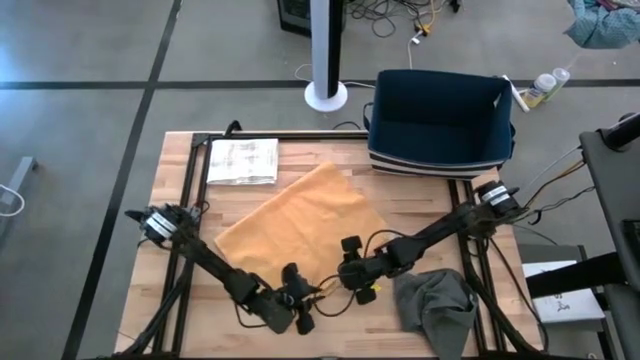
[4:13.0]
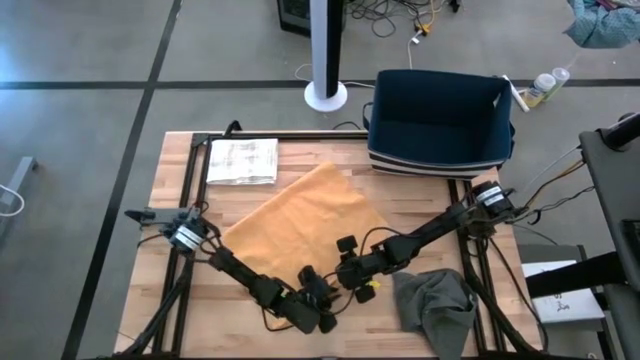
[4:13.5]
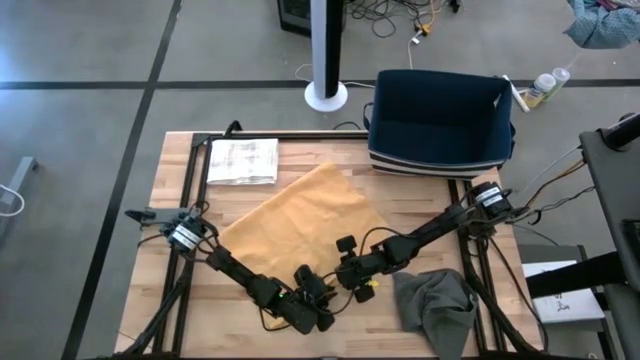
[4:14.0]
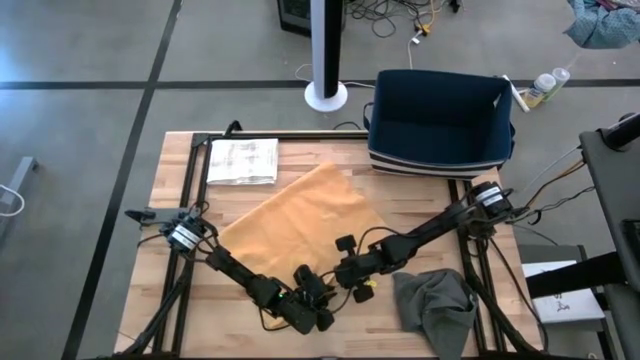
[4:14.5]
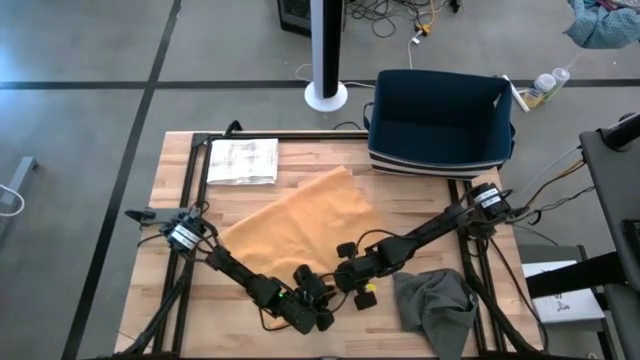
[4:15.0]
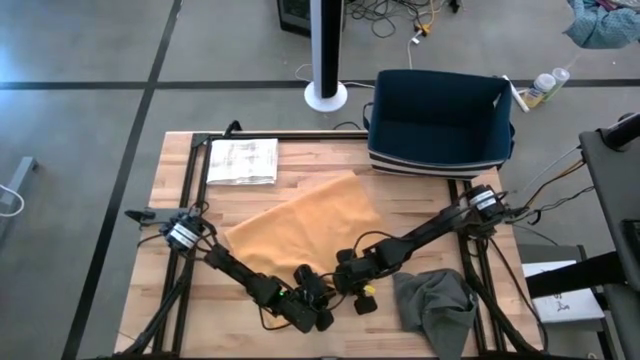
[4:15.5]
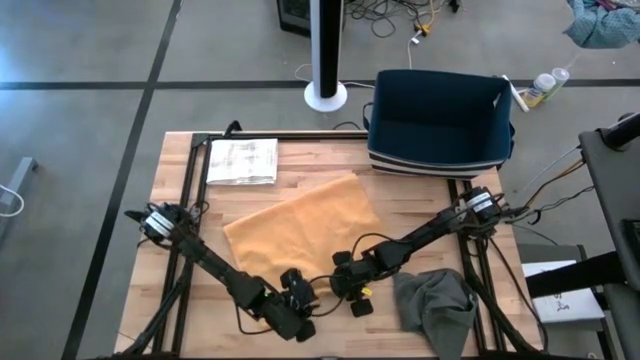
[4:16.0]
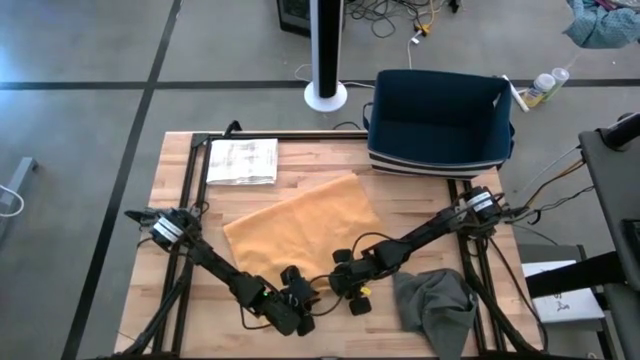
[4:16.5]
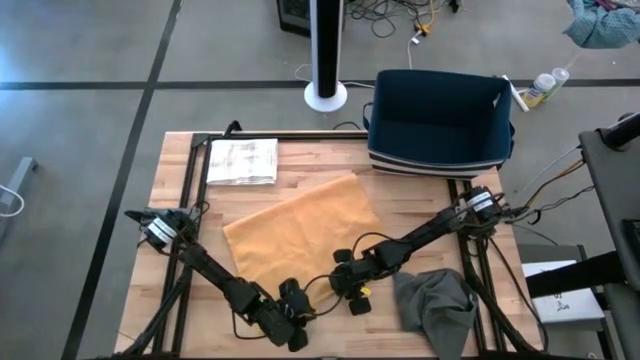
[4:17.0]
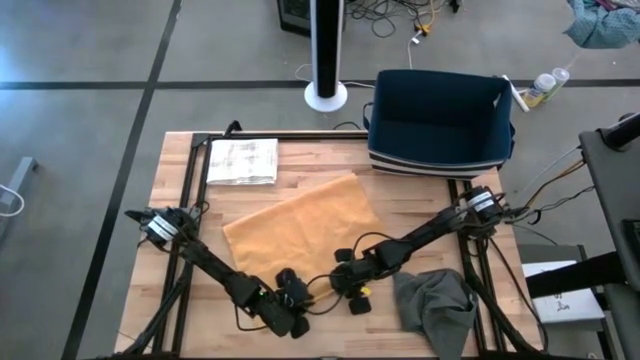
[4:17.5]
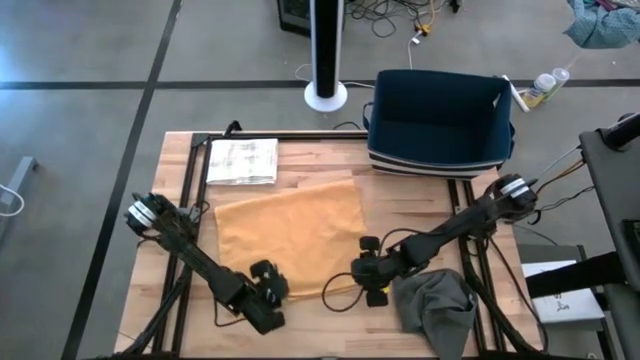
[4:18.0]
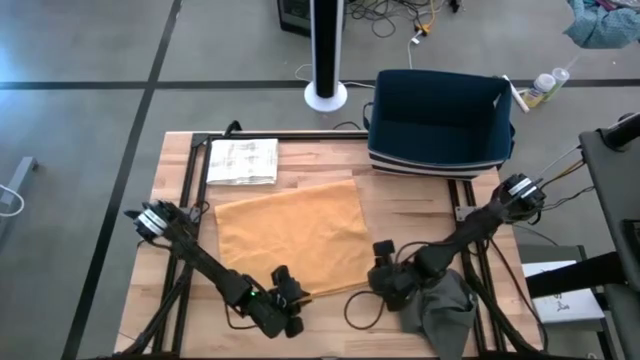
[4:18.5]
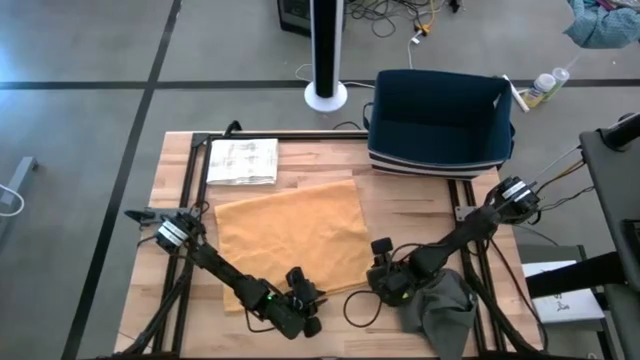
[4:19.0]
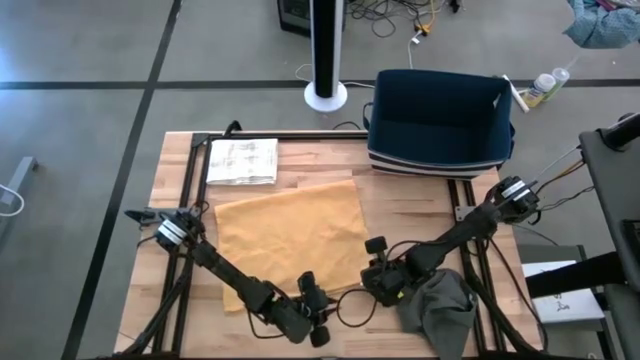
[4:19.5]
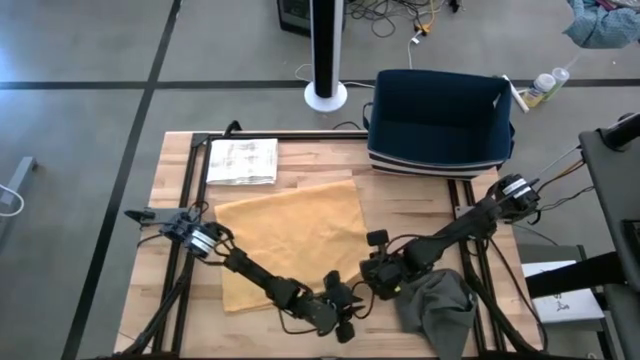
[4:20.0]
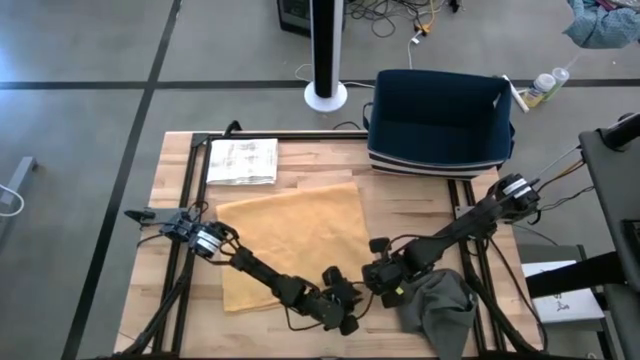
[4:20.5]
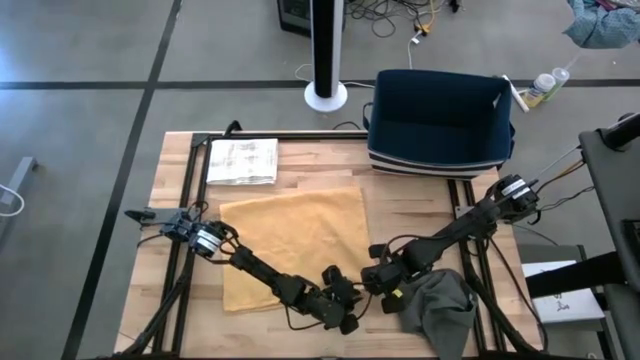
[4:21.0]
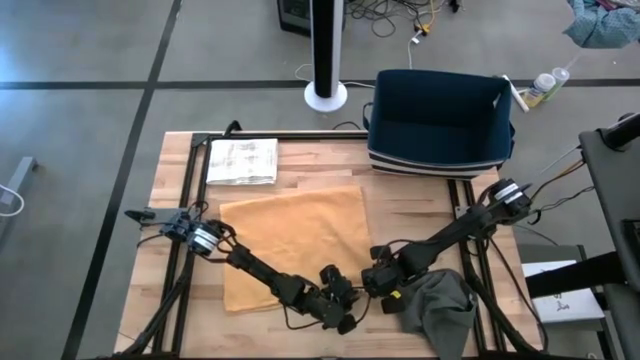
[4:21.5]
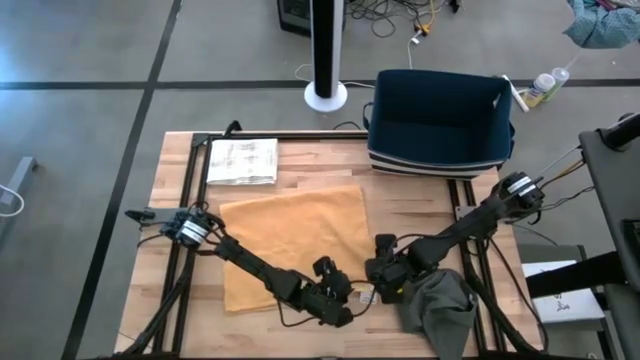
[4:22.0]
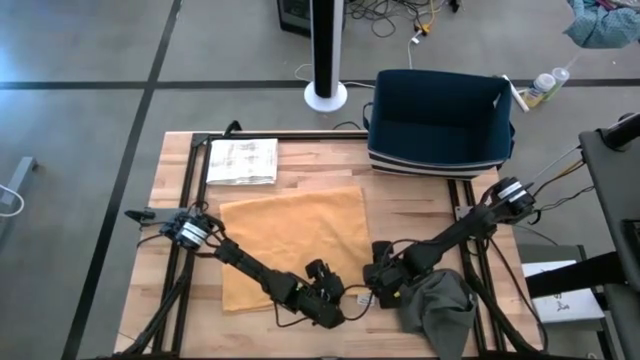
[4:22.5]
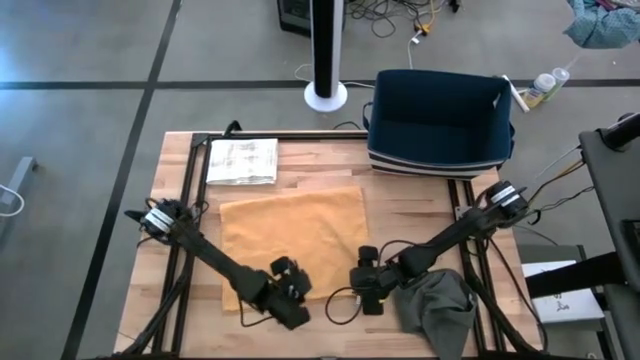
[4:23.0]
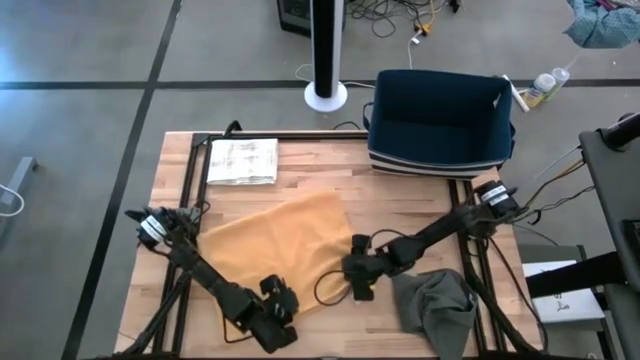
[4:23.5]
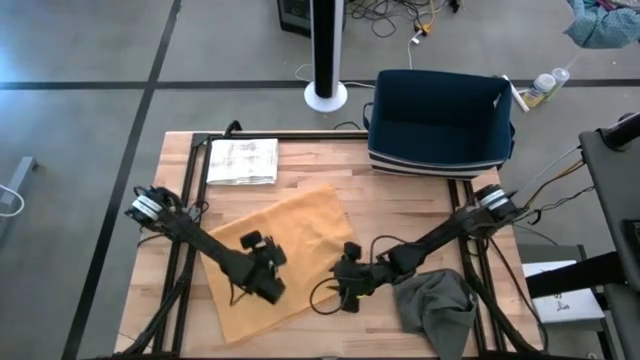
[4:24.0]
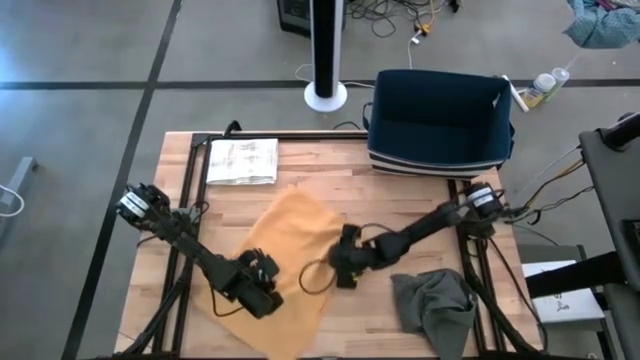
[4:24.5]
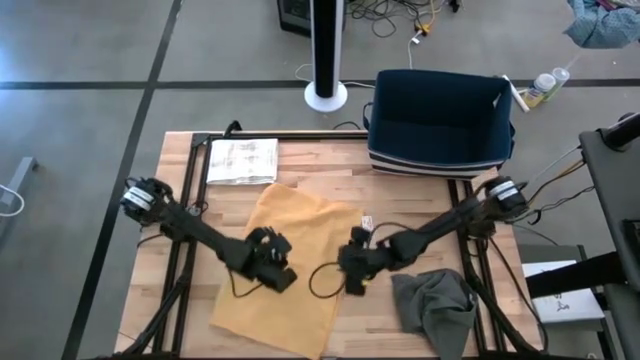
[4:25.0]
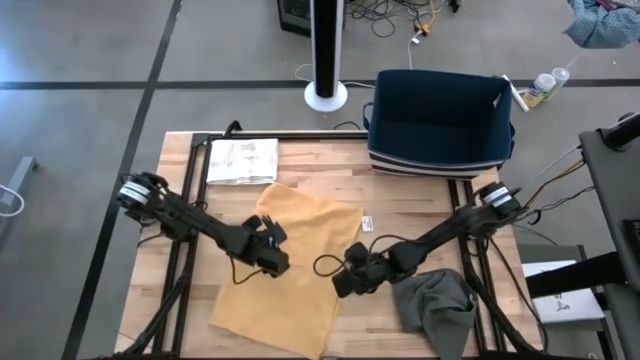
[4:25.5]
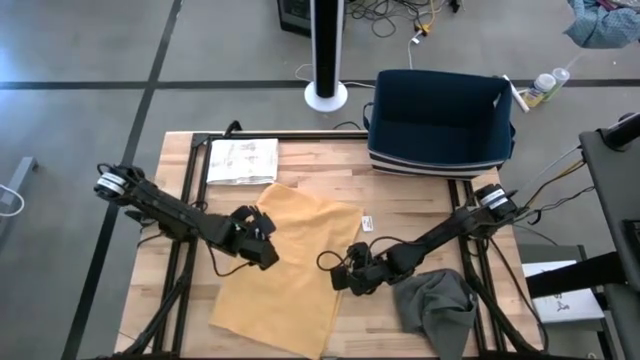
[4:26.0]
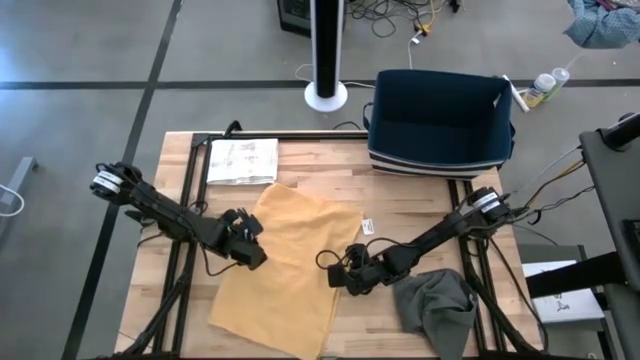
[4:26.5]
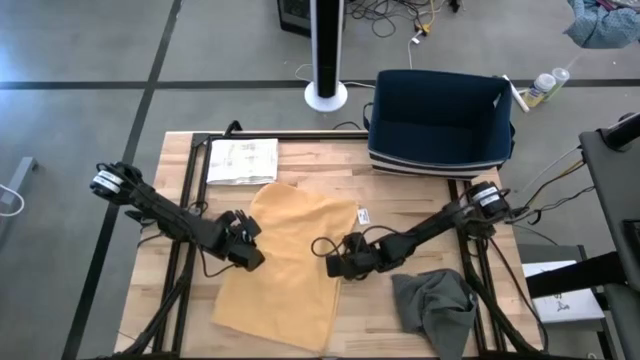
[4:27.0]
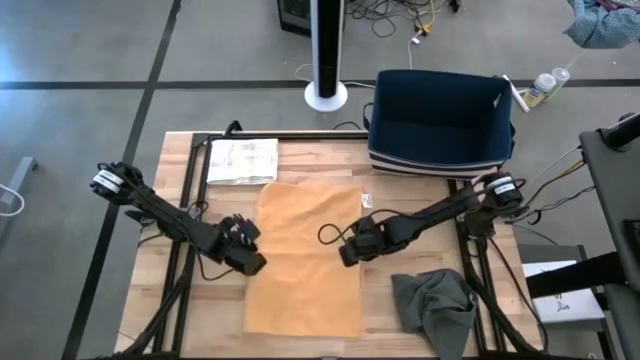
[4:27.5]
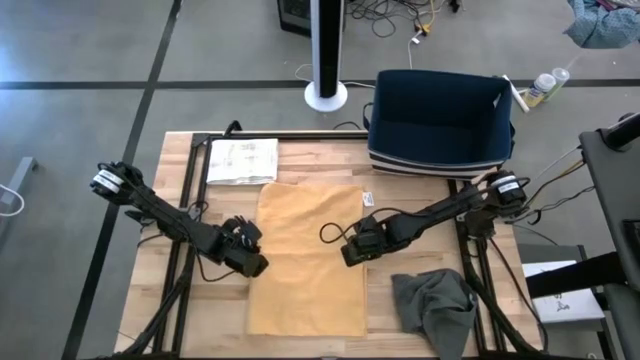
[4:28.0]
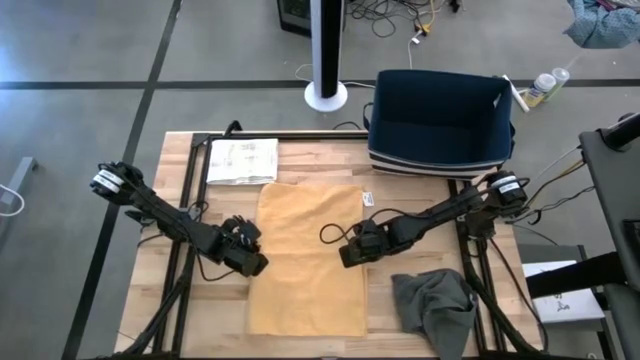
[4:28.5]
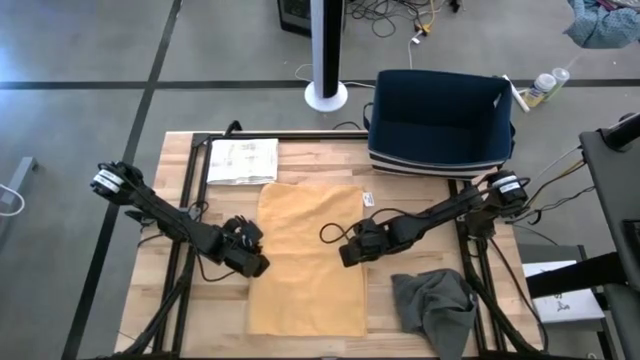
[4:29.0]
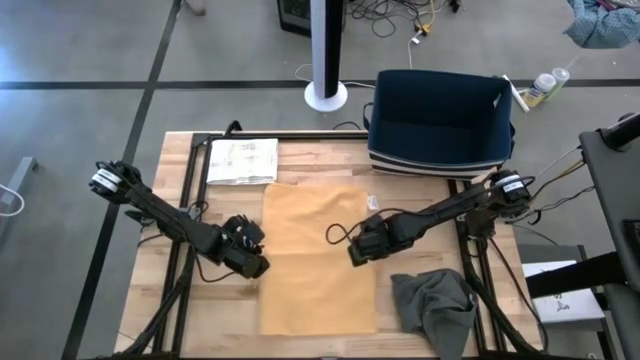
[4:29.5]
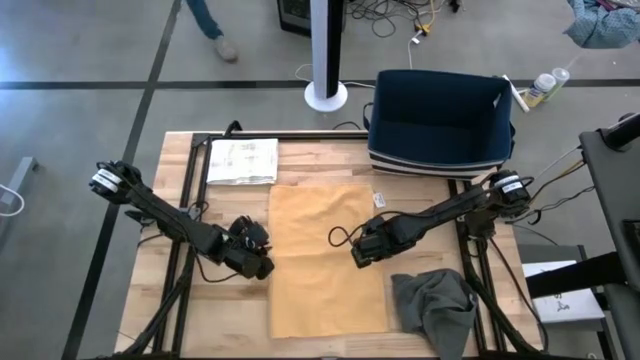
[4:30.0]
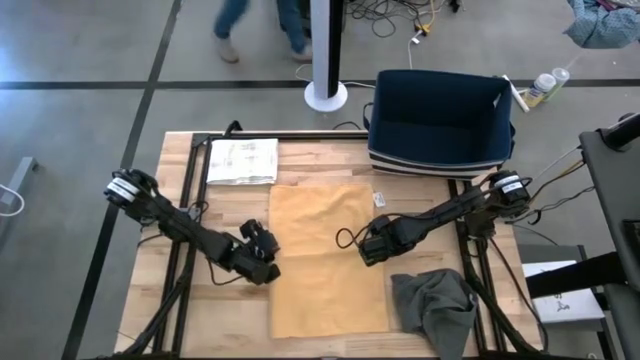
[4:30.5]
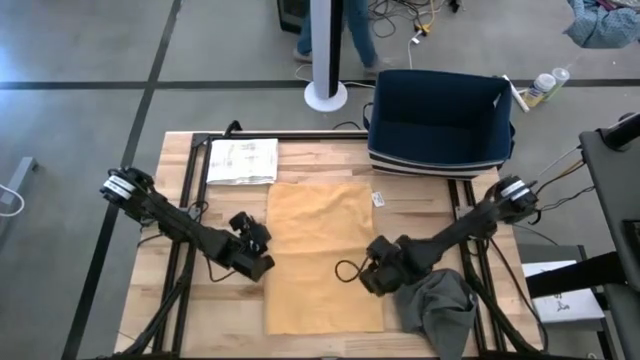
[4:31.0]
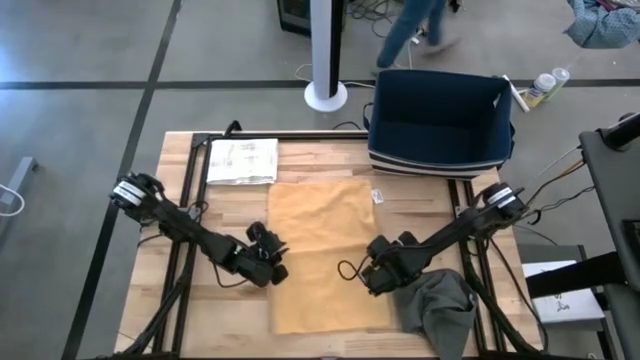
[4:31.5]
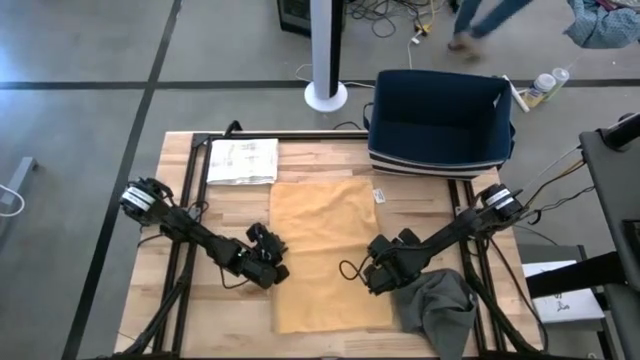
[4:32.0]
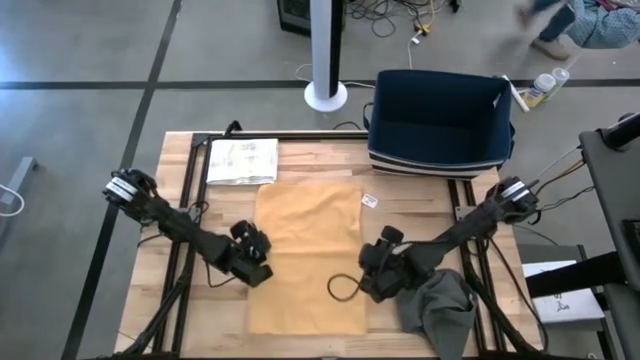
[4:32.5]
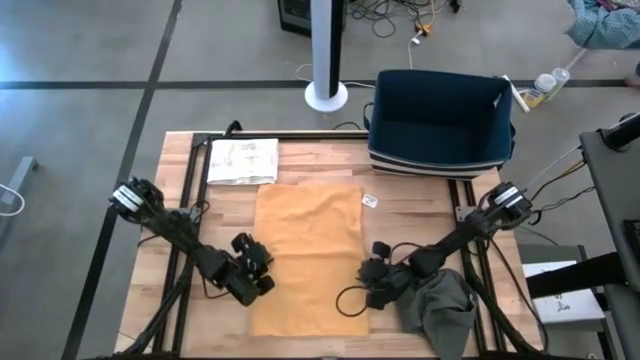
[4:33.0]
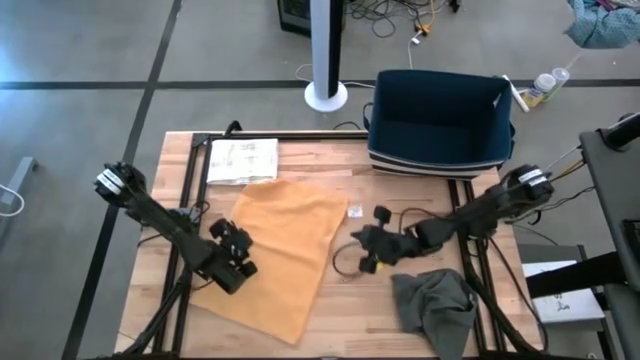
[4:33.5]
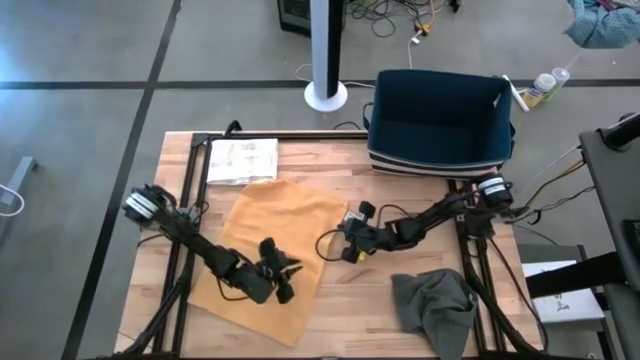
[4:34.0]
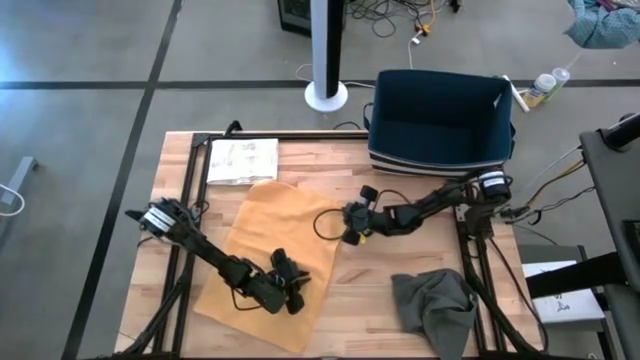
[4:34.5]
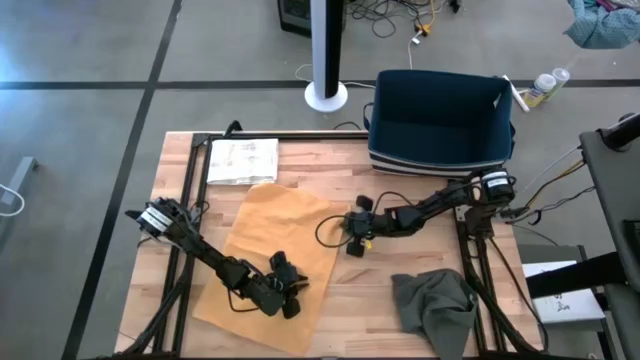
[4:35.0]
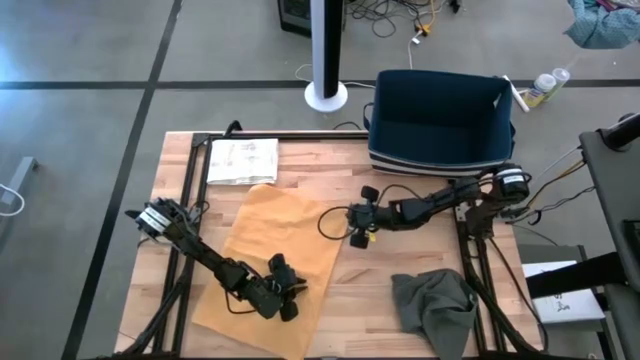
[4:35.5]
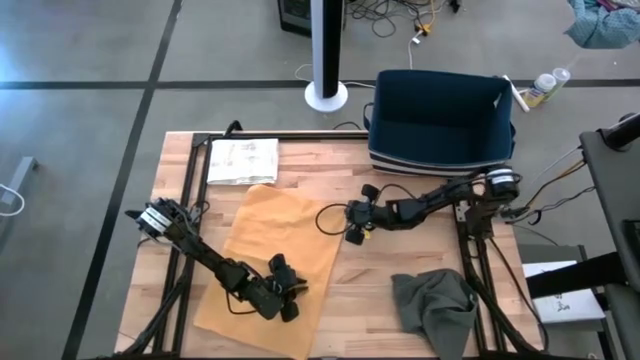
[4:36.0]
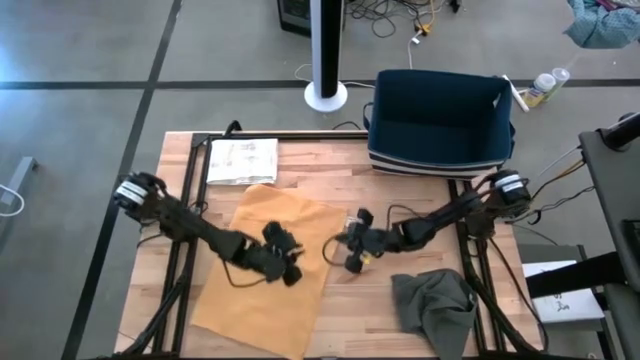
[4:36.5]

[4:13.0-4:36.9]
Task: Fold towel
Fold the yellow towel
